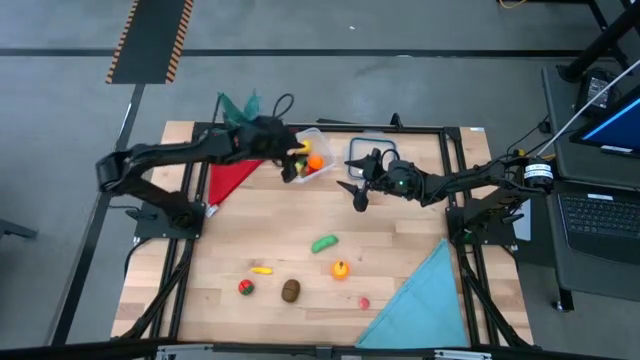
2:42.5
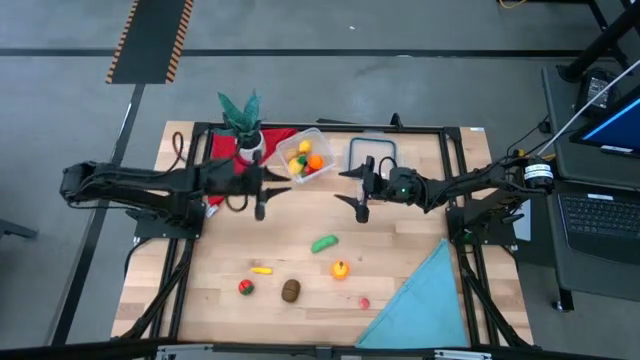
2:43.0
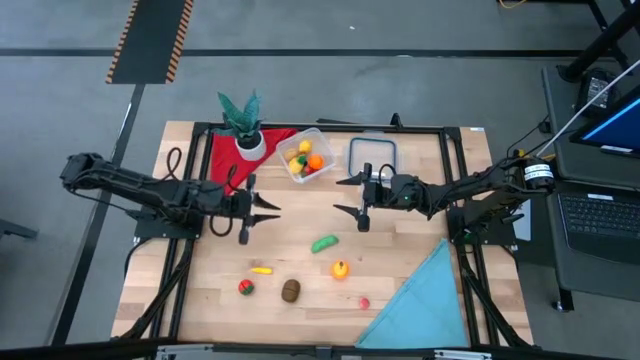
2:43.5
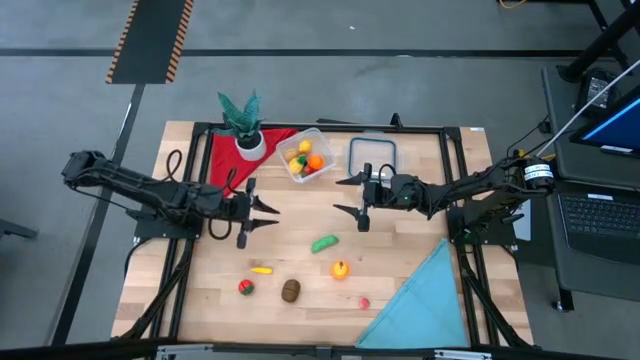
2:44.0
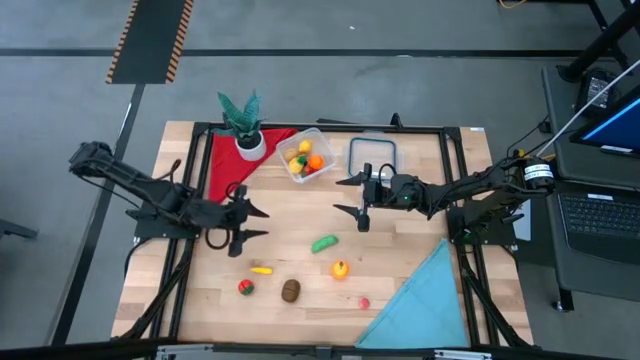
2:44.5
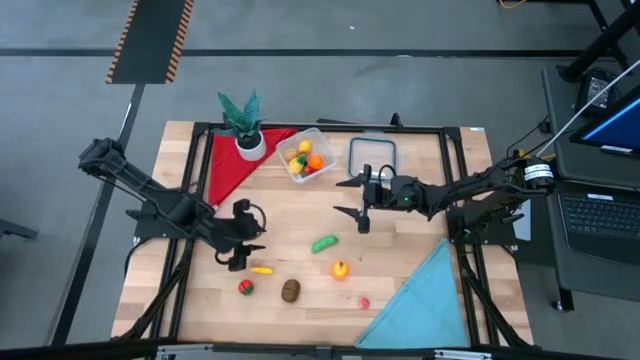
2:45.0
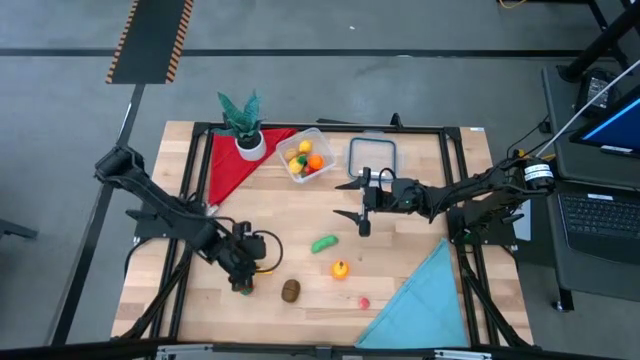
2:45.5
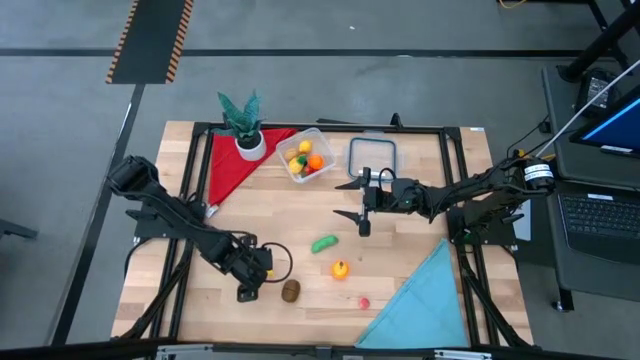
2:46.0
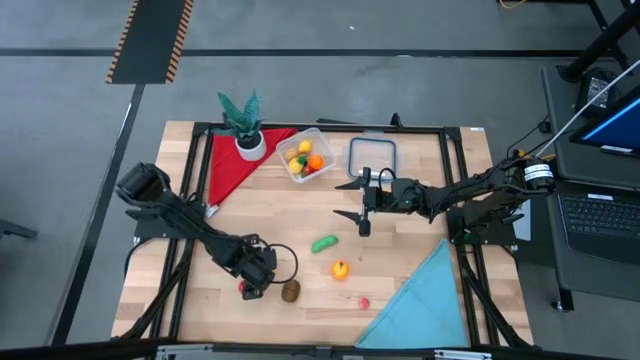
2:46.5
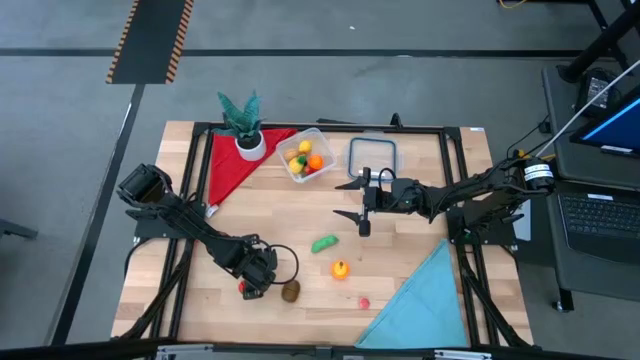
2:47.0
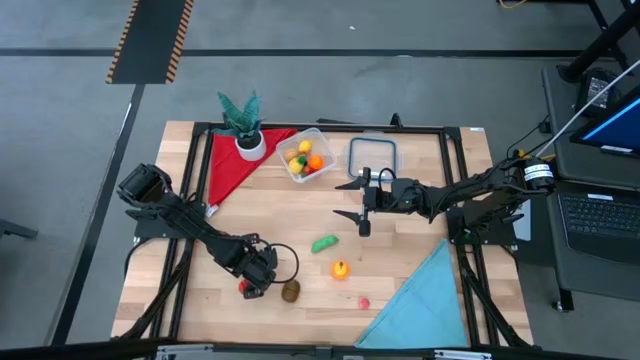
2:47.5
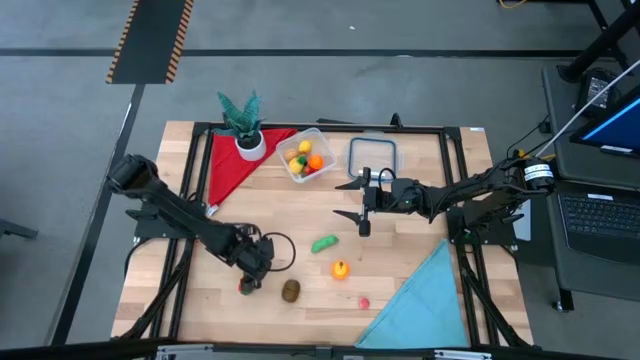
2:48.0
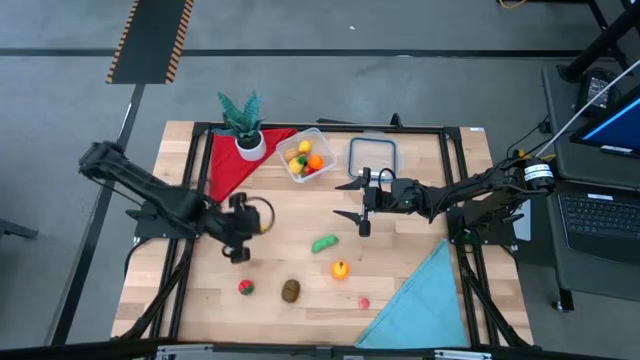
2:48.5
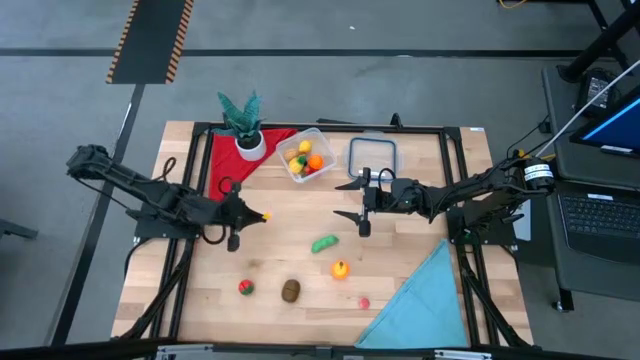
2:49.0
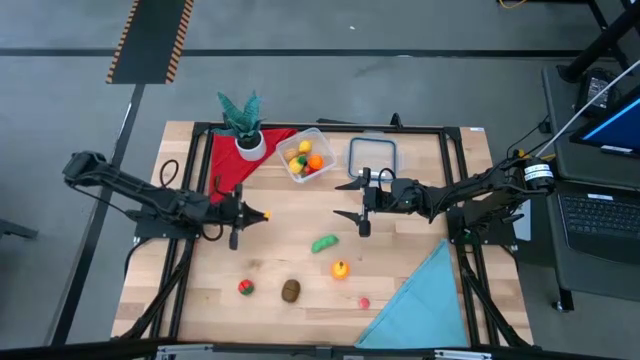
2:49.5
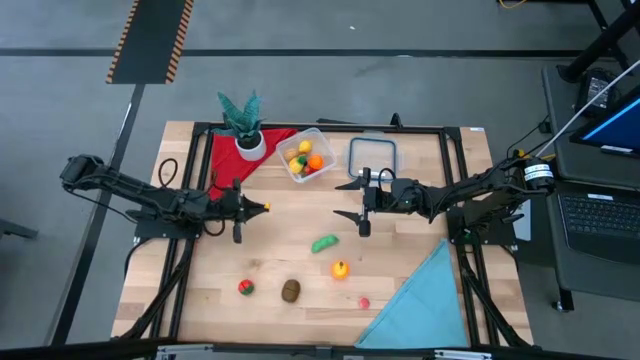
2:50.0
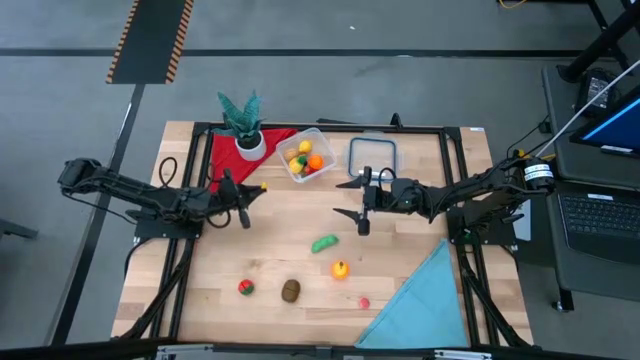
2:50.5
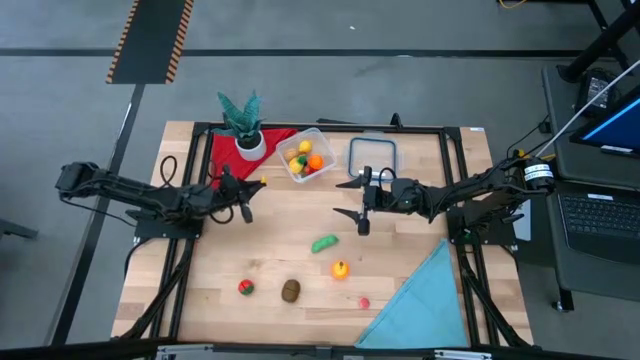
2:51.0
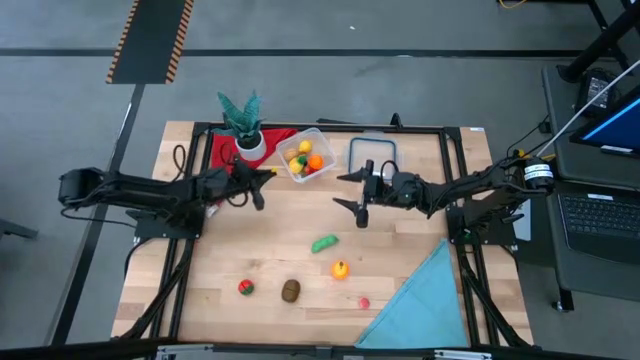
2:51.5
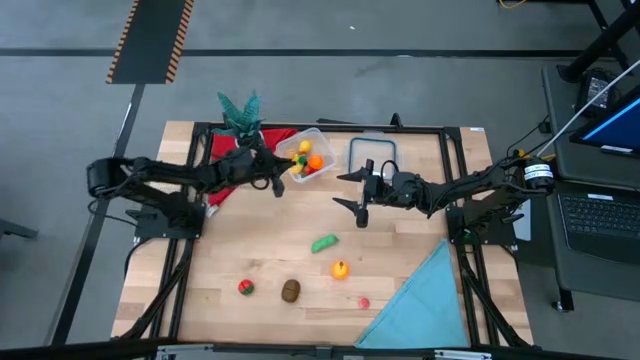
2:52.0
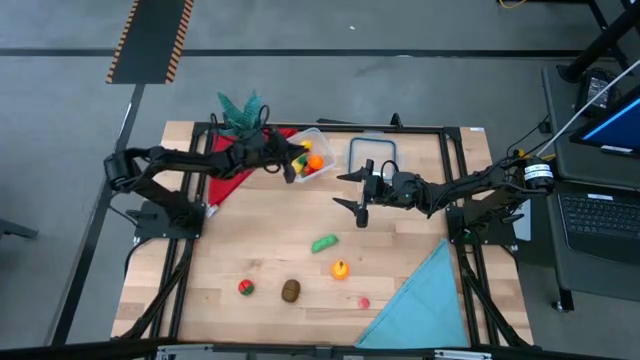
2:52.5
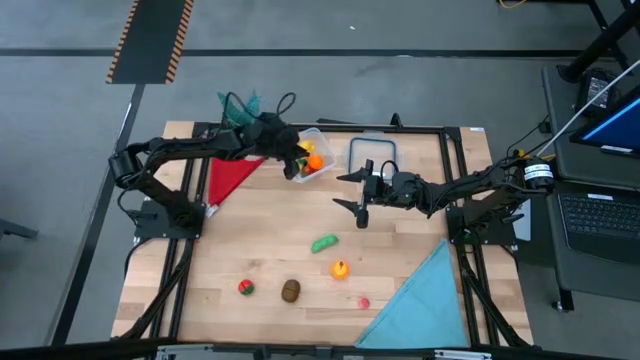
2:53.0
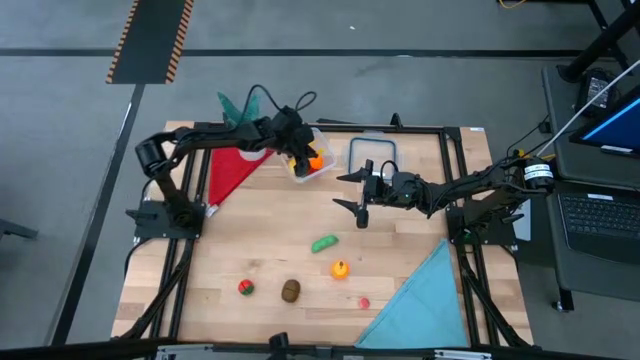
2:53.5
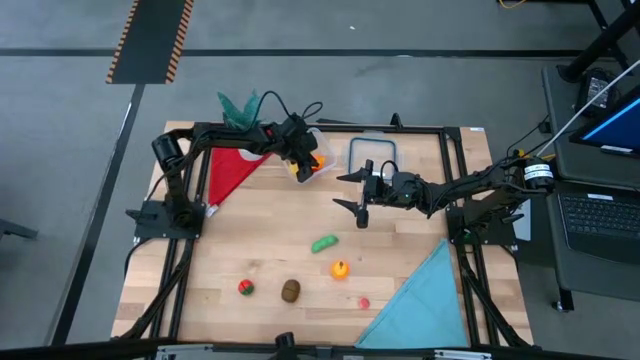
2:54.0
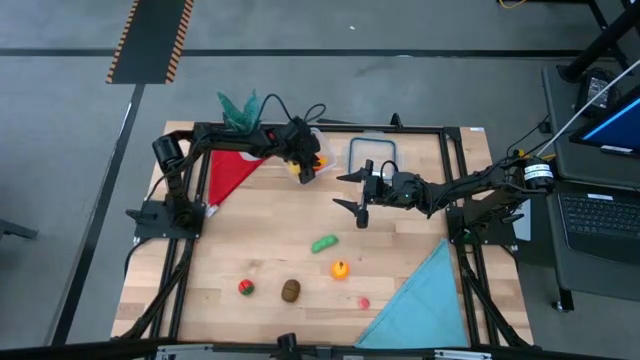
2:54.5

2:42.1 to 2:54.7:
Task: Pick and placing Produce into tupperware
Put the corn into the transparent bin

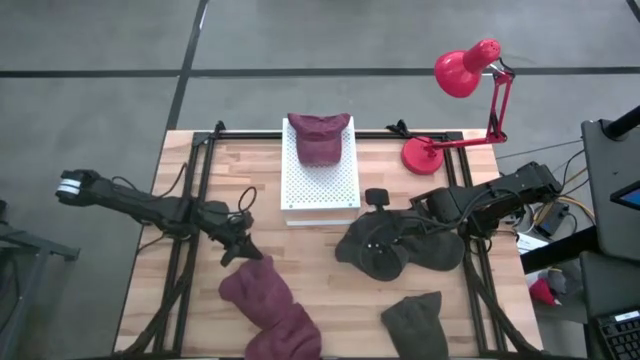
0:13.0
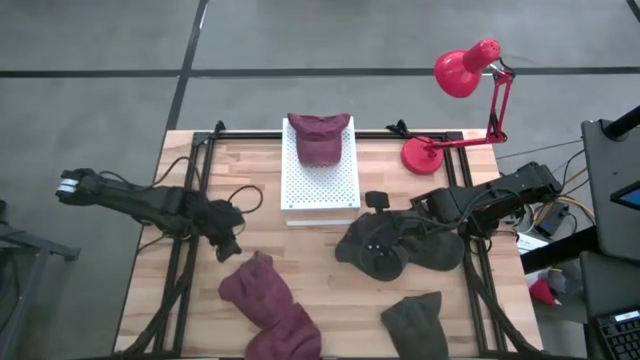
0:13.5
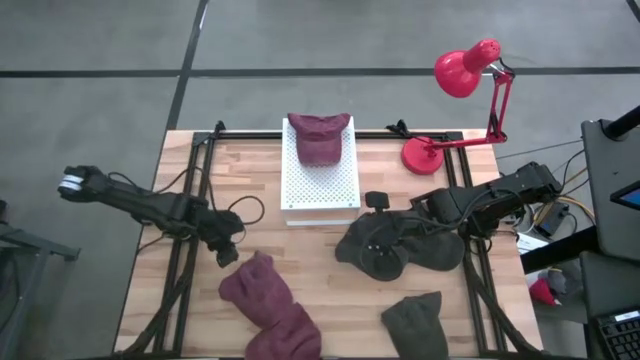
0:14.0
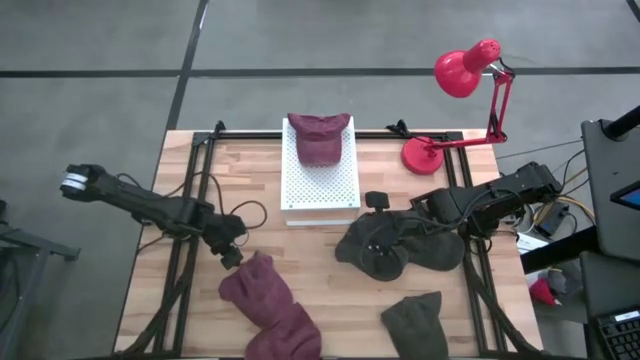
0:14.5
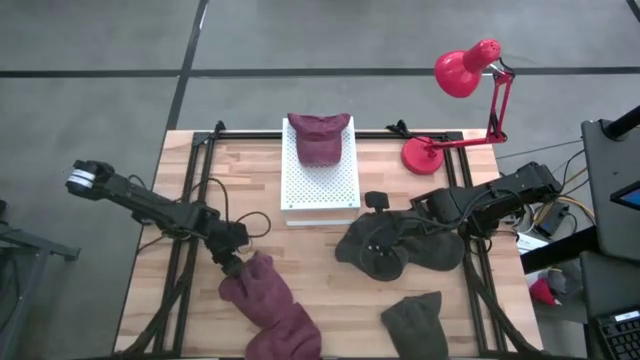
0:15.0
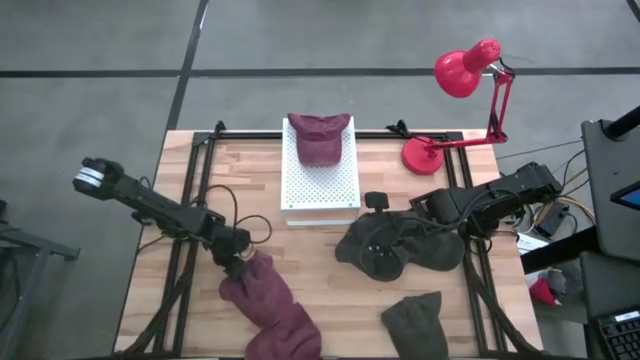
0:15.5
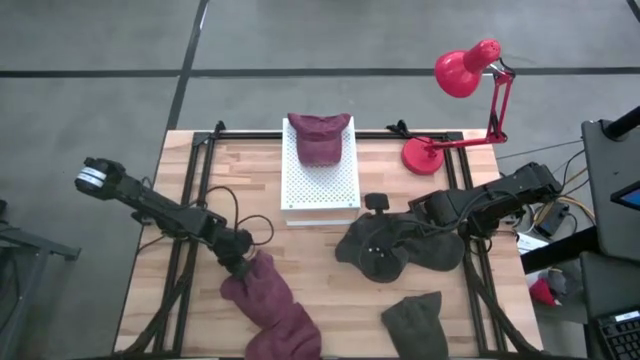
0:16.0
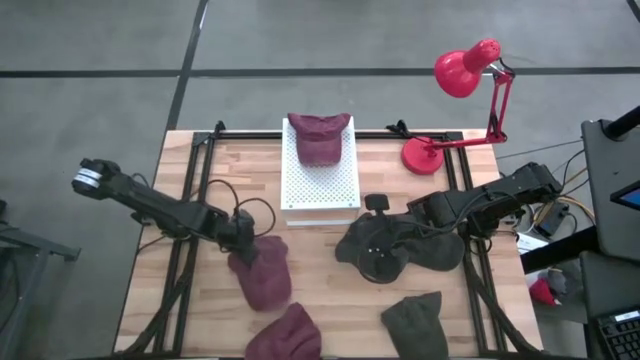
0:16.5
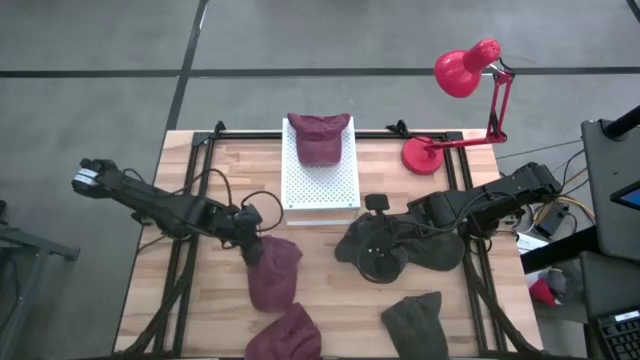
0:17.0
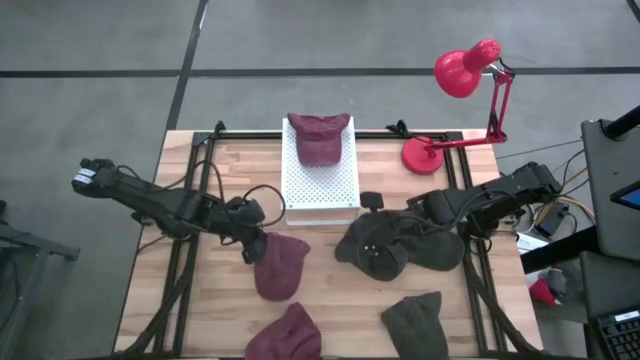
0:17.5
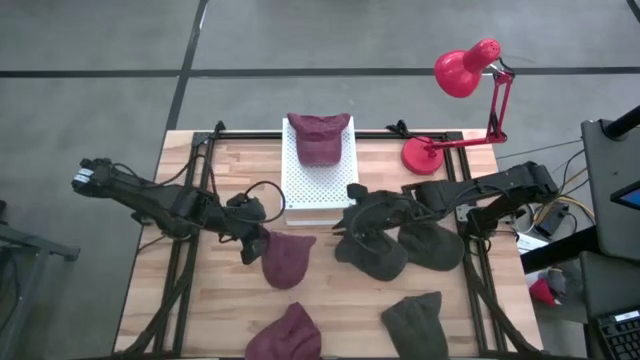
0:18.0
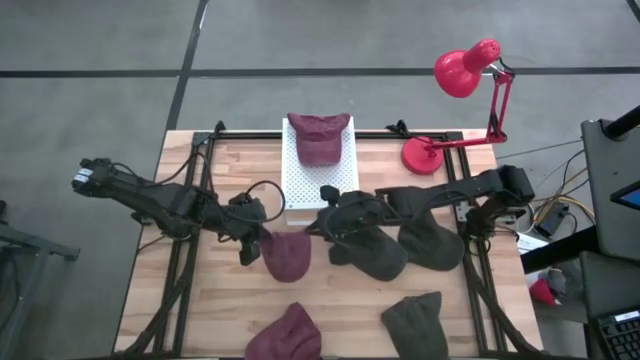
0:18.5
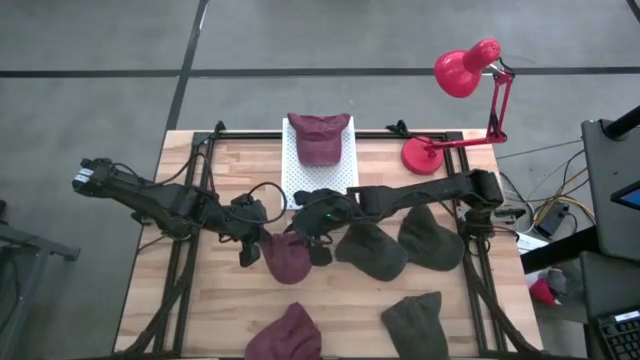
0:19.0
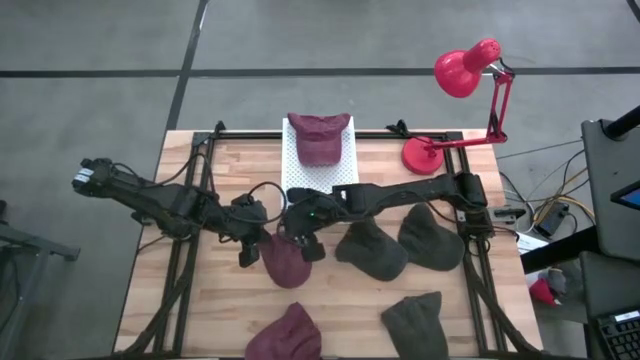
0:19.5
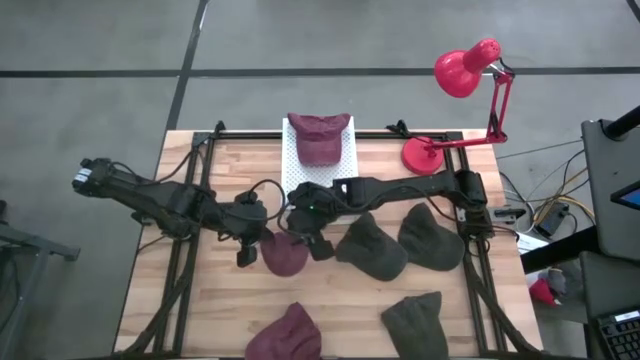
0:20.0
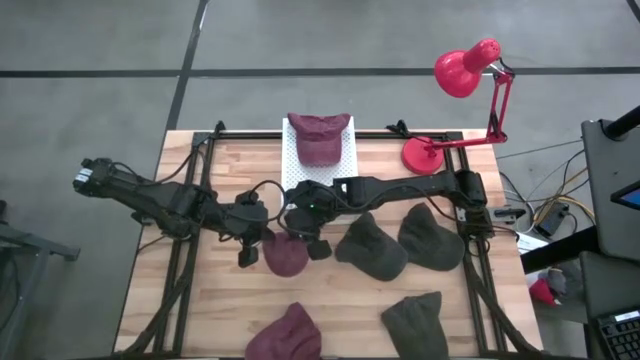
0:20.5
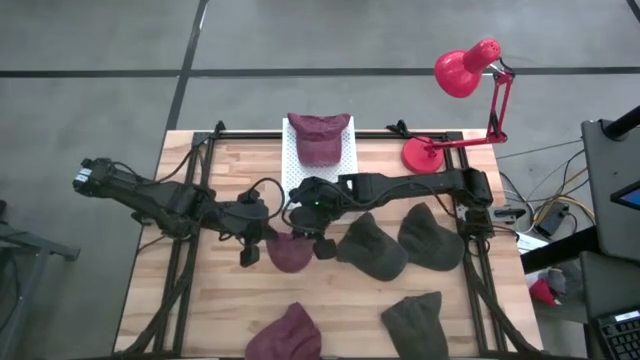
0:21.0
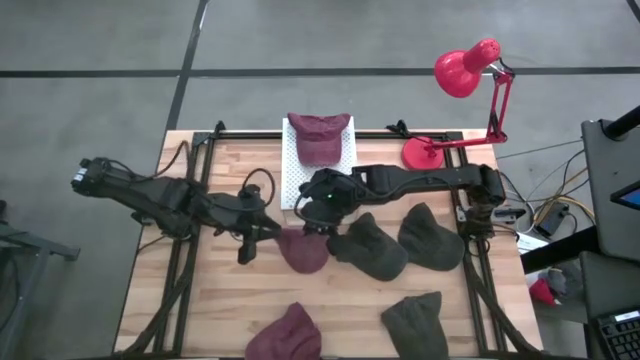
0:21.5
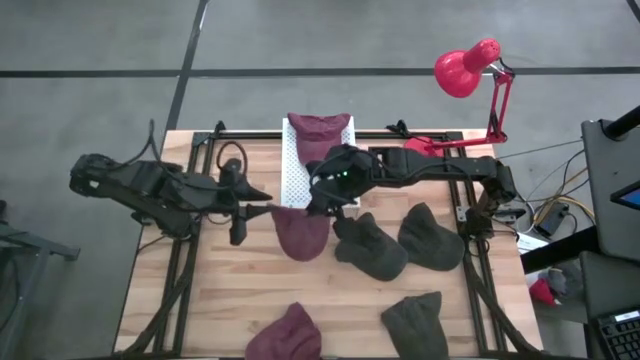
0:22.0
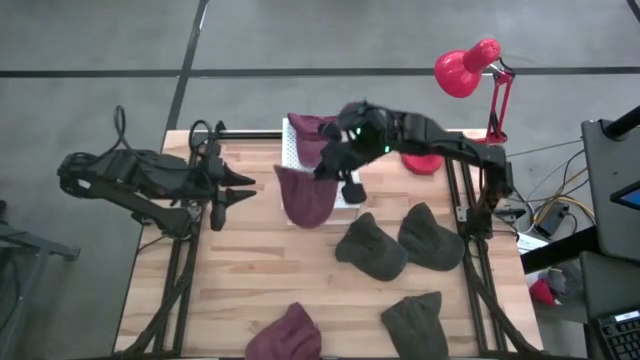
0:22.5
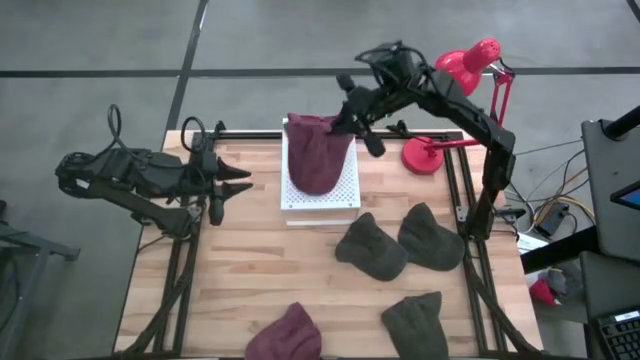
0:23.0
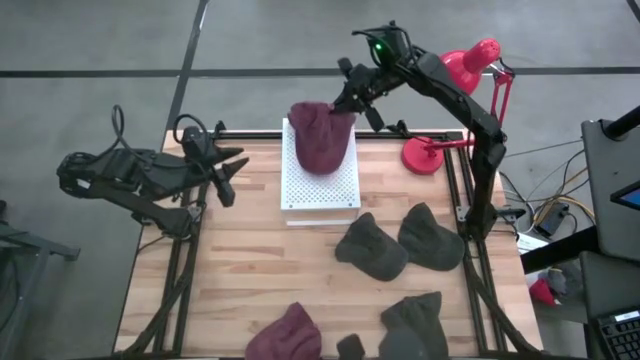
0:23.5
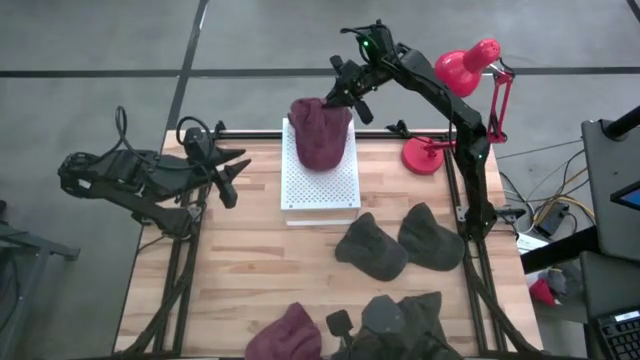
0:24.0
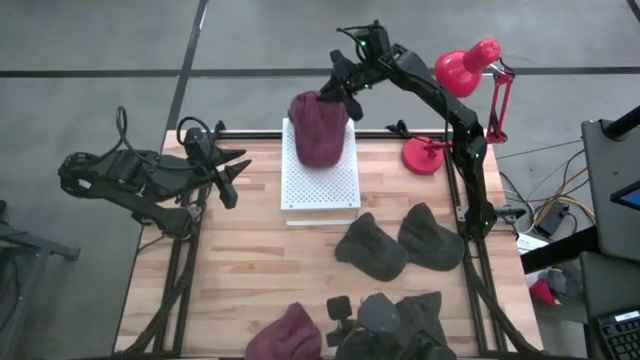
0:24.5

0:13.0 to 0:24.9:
Task: Pick & Place hat
Stack the top red cap on the red cap on the shelf
